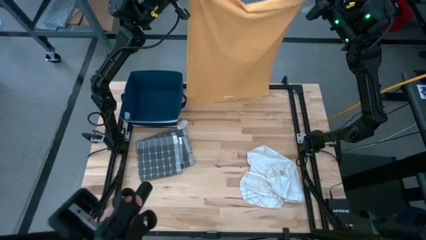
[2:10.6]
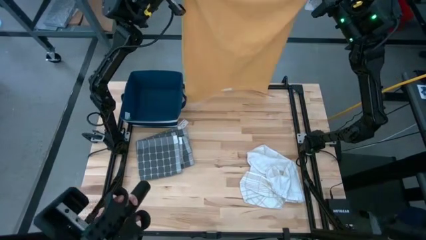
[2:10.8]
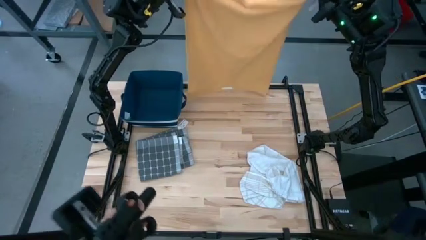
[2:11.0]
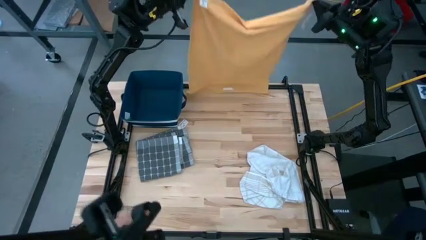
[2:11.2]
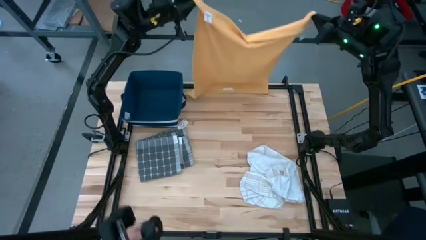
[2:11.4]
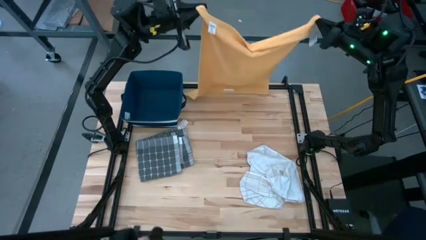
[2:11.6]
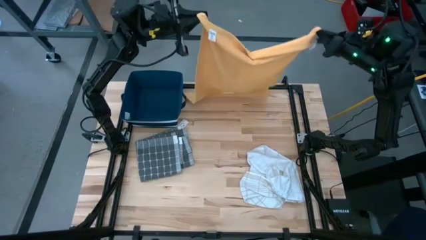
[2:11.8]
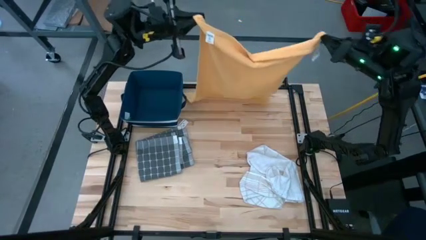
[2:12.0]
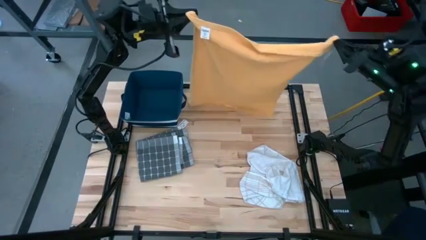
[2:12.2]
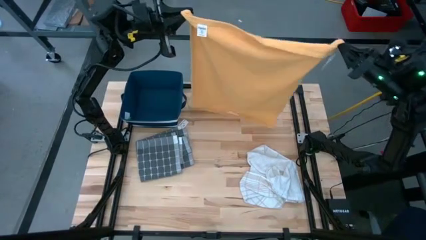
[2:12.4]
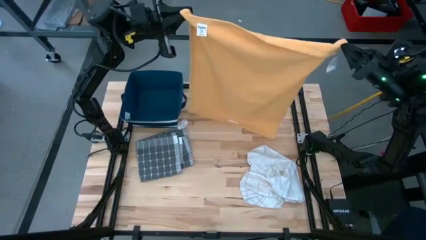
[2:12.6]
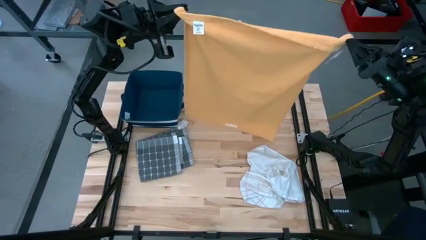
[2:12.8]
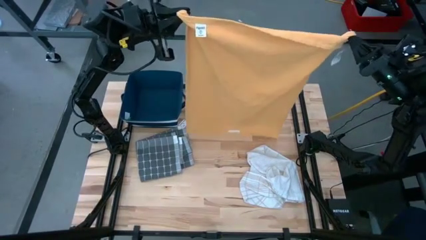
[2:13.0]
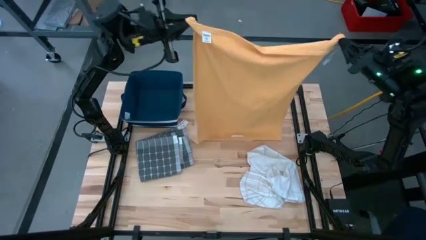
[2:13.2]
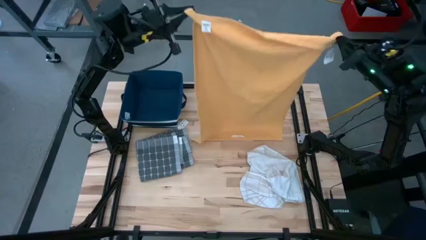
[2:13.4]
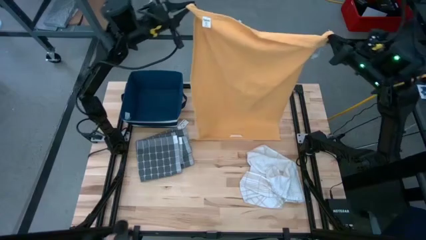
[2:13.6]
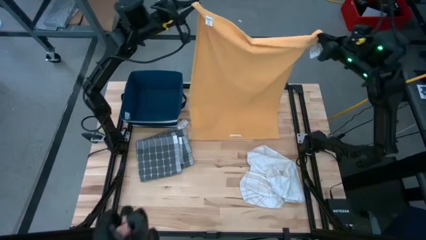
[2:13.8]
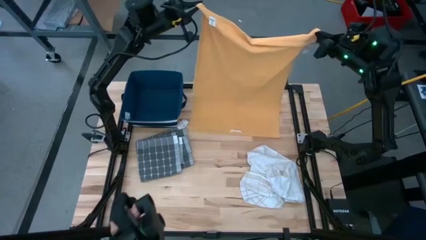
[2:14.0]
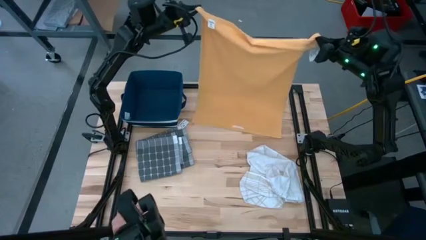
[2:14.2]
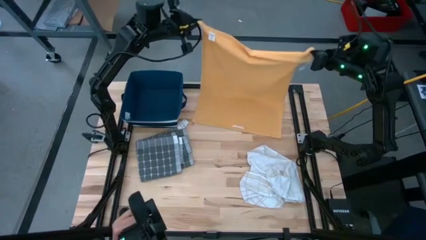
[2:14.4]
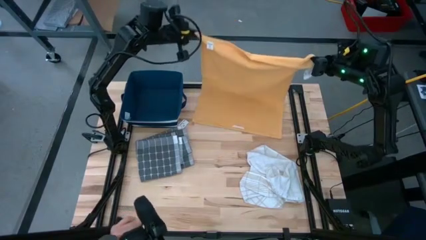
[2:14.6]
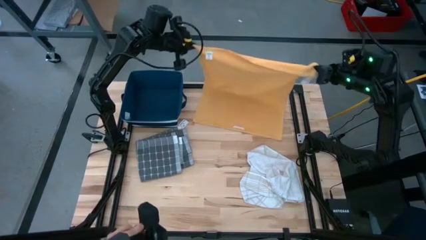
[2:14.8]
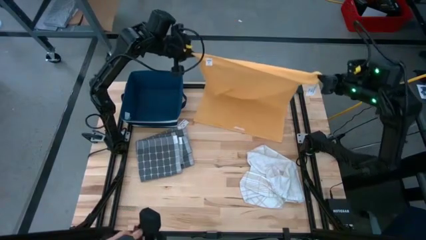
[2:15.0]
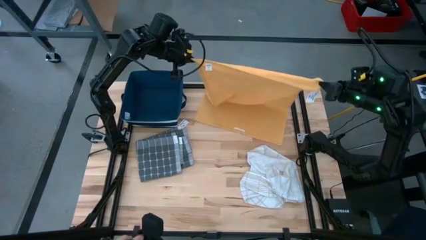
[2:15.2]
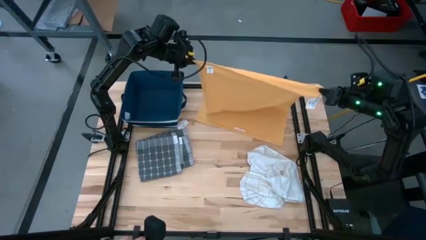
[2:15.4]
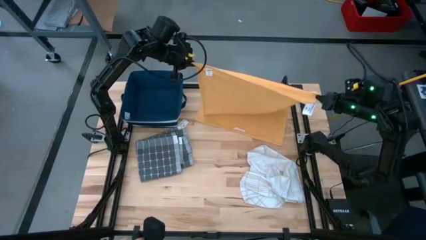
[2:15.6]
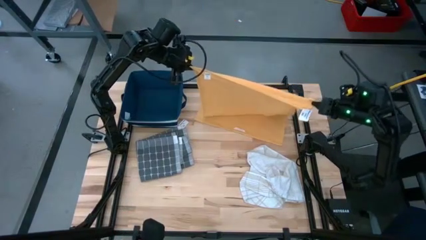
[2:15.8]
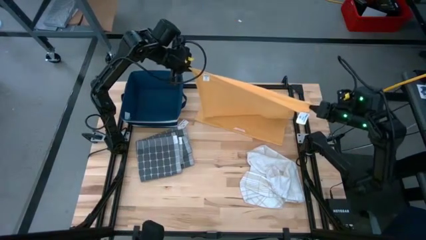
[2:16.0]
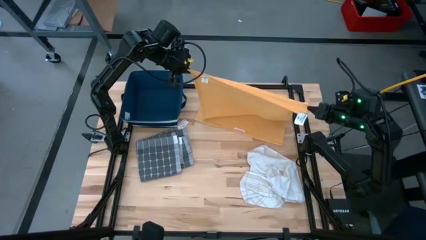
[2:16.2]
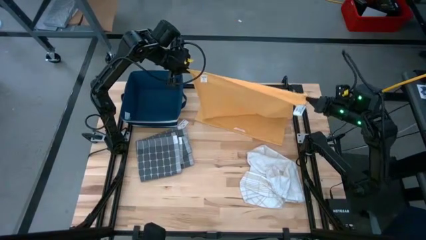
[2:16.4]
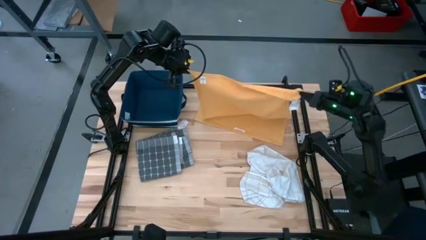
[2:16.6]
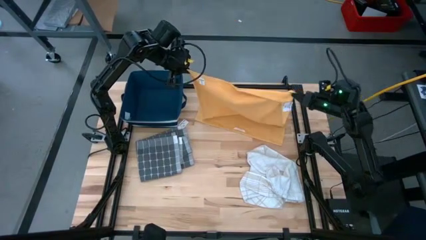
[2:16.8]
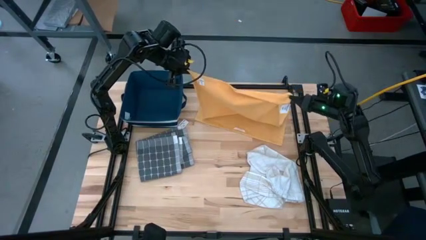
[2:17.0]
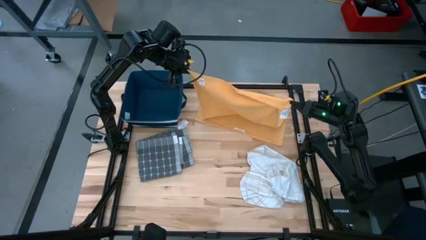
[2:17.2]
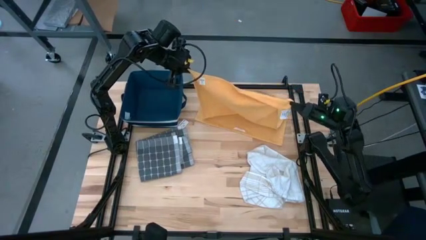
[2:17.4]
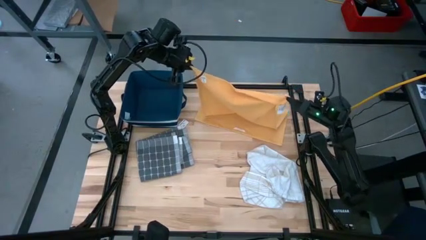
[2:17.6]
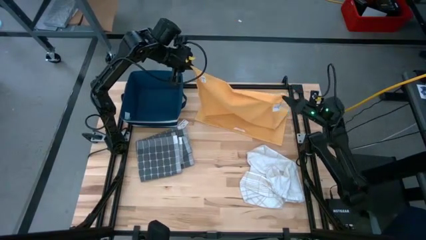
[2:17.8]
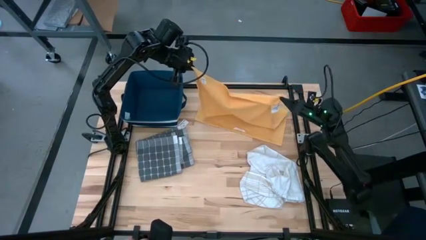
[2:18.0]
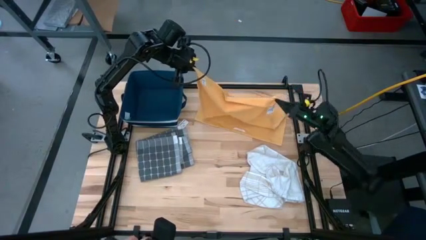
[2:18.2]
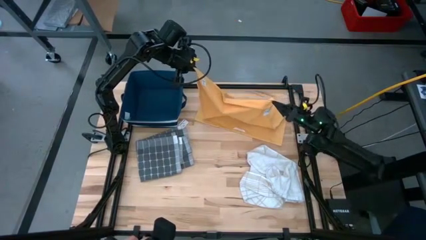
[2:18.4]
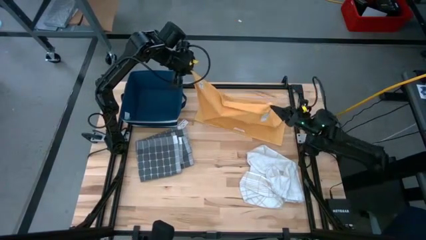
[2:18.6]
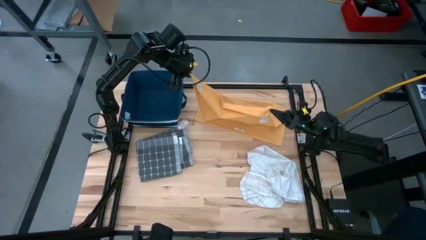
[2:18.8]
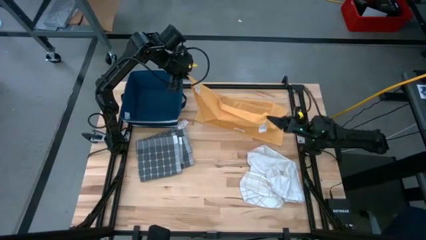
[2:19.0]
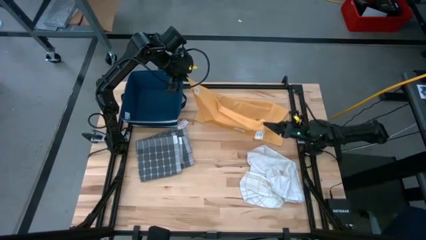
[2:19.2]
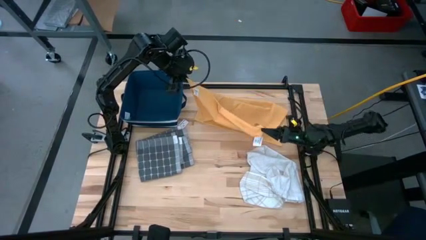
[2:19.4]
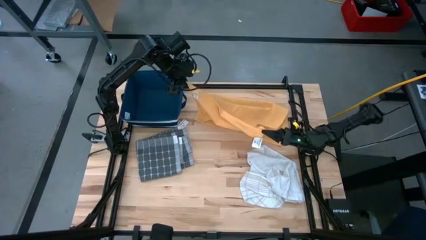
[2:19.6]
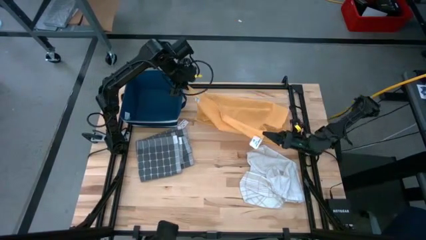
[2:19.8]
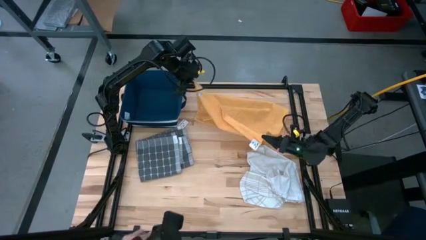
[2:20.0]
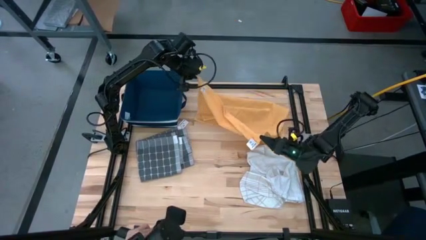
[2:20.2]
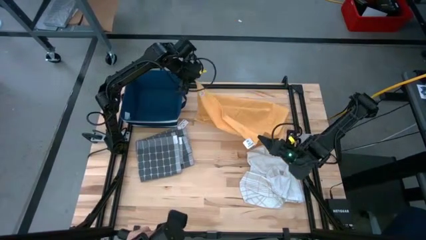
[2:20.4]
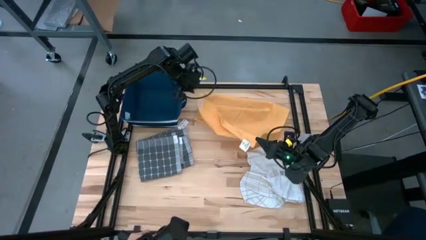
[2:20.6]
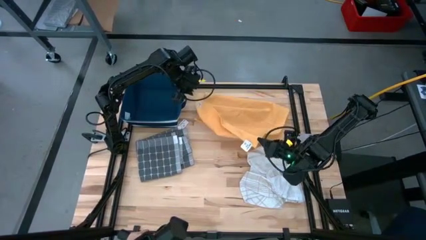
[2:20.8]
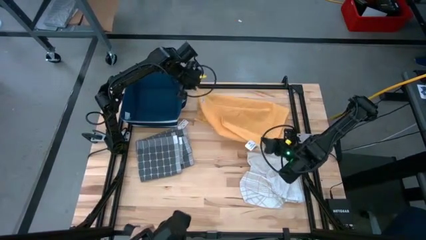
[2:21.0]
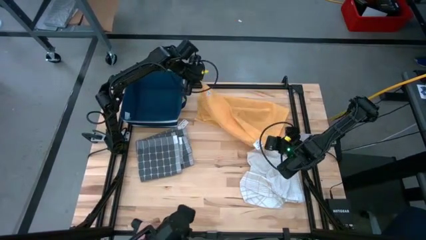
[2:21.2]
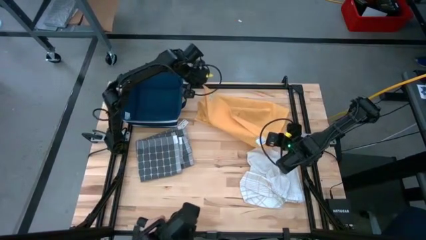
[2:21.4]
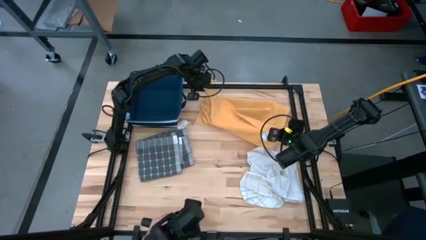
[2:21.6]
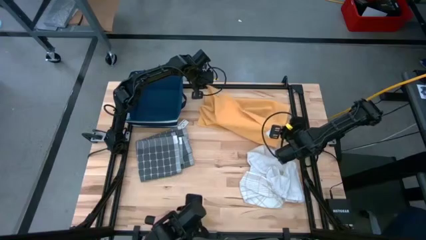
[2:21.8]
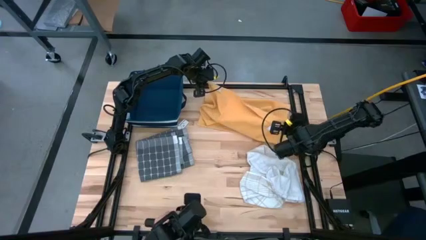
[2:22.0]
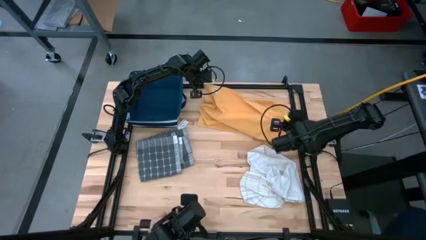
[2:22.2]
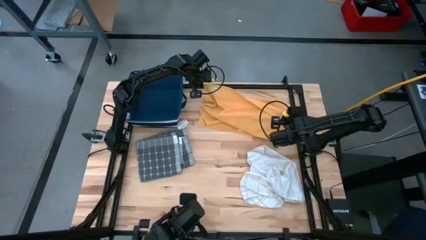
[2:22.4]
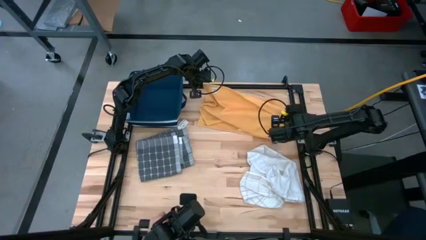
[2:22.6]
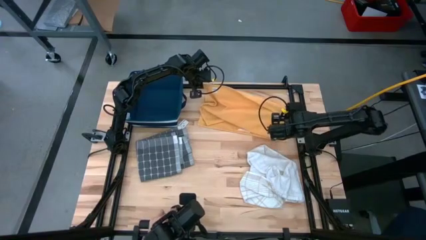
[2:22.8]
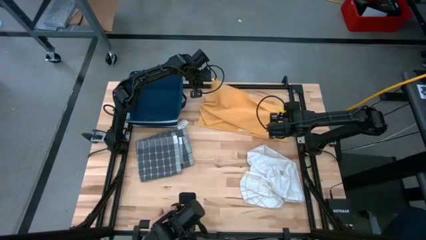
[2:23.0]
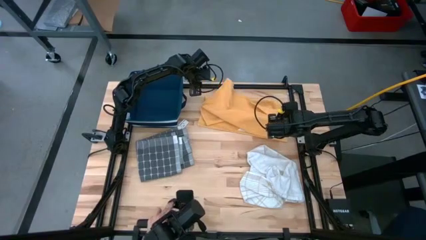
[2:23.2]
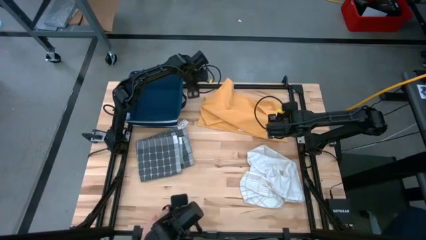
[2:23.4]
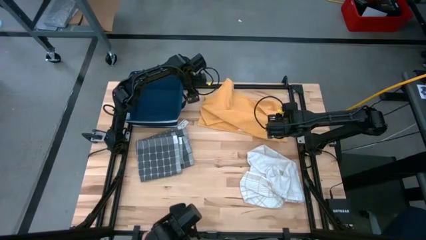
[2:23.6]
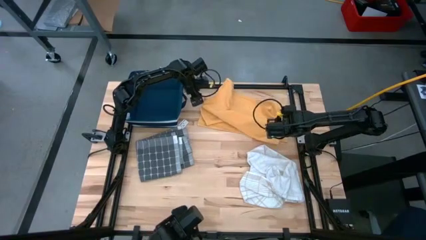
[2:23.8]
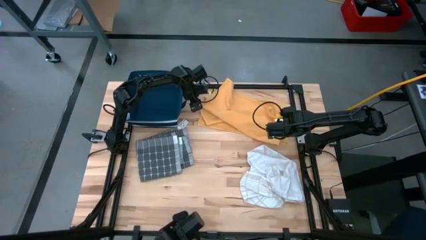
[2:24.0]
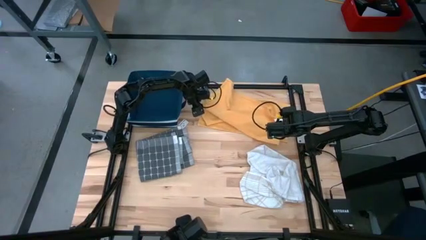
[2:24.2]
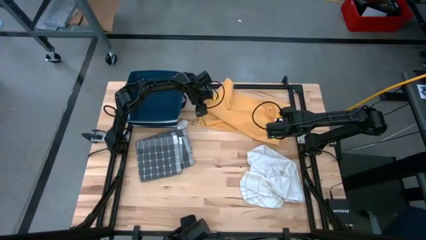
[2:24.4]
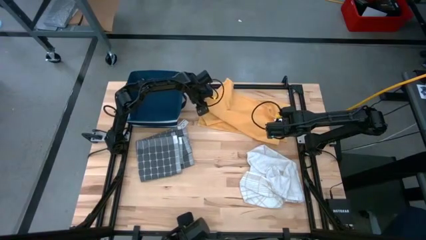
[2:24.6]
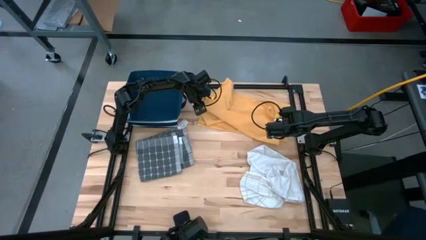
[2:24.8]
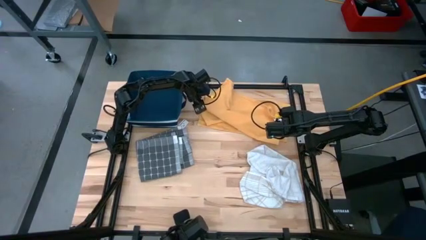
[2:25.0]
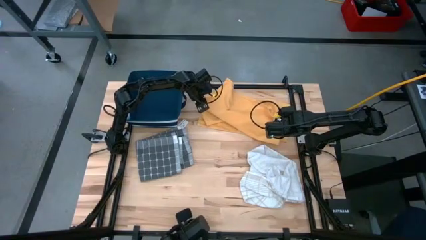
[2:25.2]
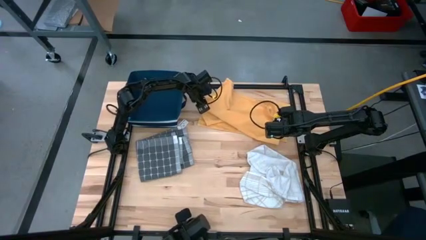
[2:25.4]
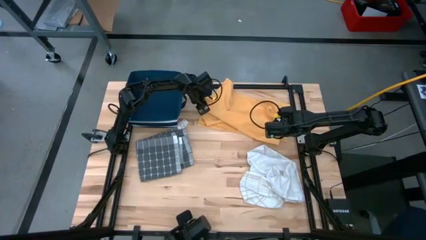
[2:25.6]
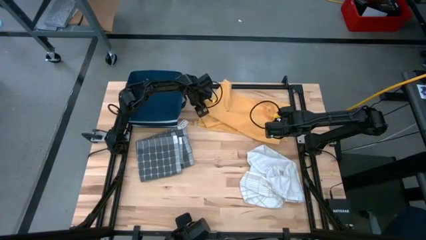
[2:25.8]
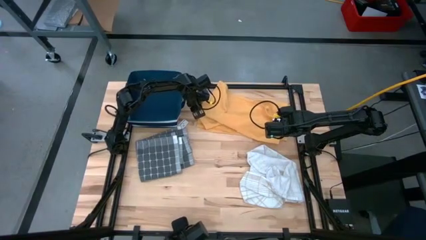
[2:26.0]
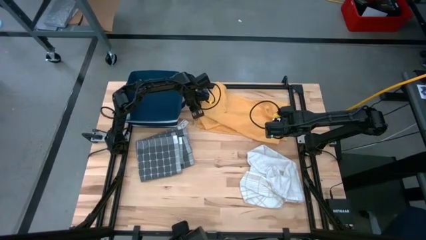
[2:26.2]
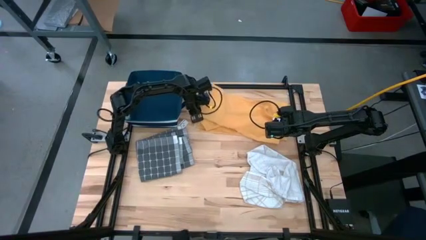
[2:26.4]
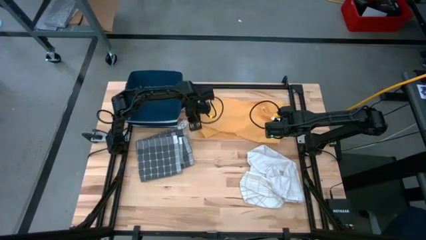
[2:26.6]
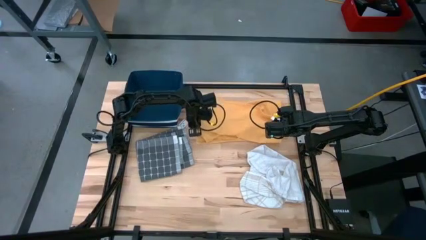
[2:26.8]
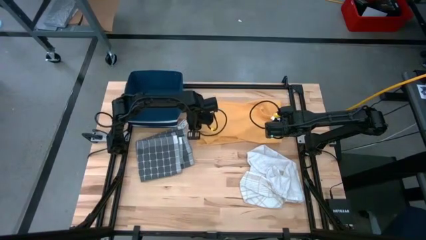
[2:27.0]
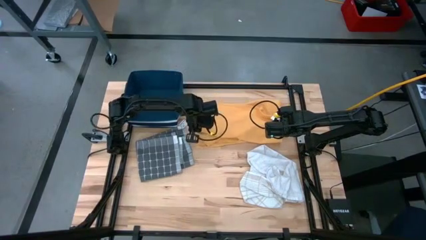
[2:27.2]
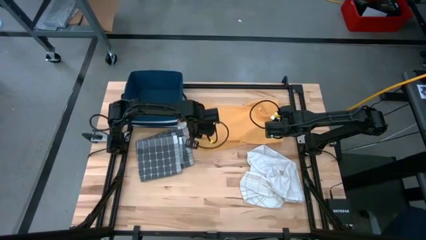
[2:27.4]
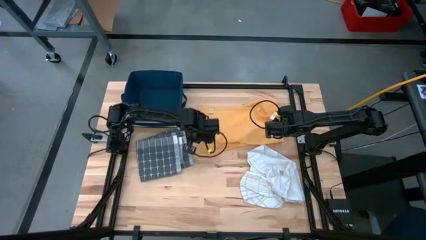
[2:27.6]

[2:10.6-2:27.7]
Task: Fold towel
Fold the yellow towel
